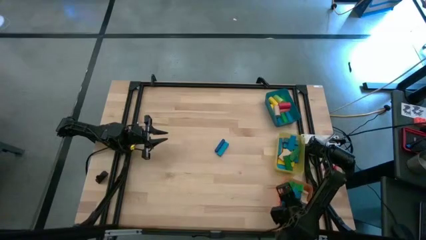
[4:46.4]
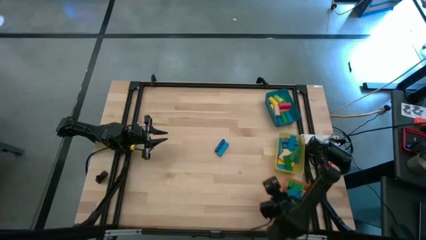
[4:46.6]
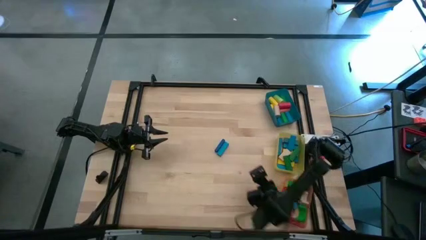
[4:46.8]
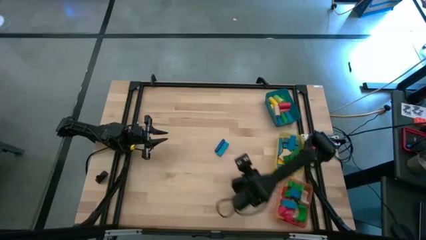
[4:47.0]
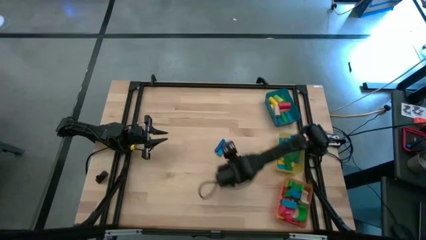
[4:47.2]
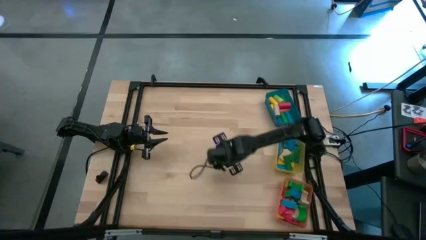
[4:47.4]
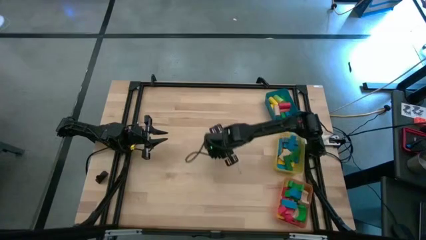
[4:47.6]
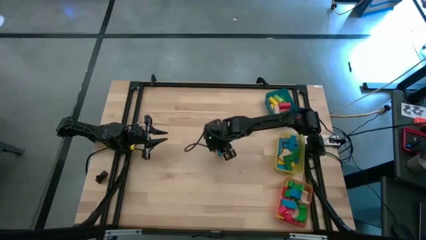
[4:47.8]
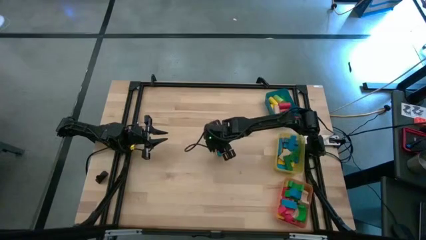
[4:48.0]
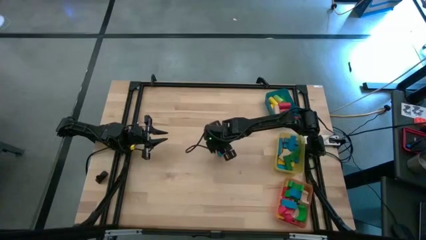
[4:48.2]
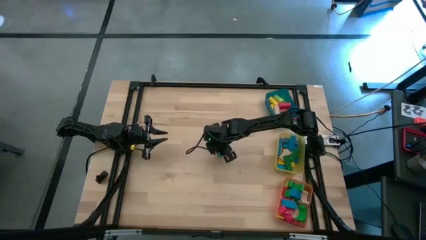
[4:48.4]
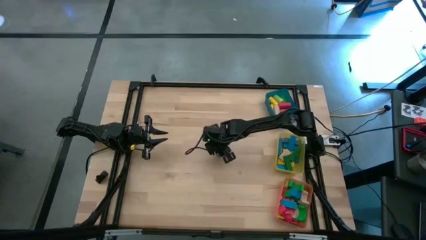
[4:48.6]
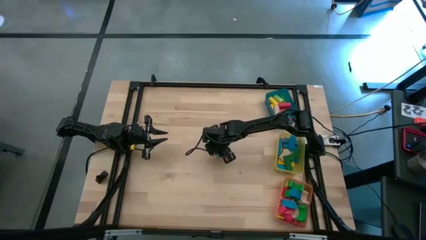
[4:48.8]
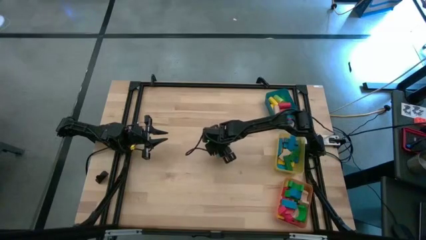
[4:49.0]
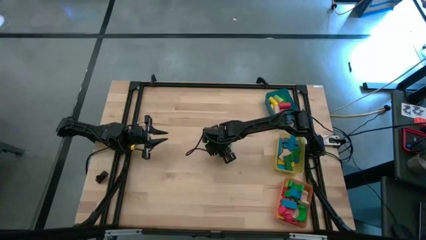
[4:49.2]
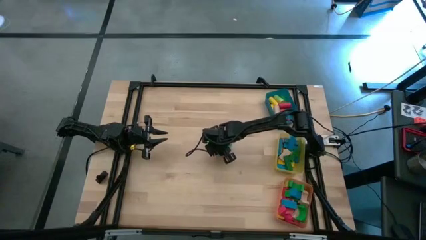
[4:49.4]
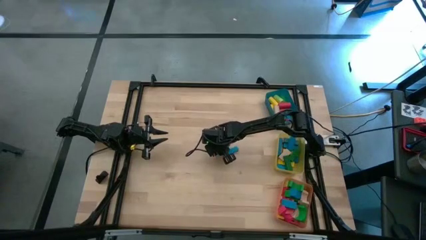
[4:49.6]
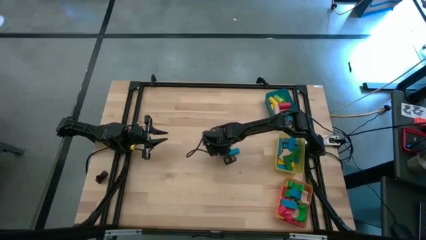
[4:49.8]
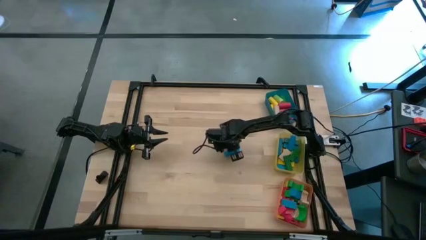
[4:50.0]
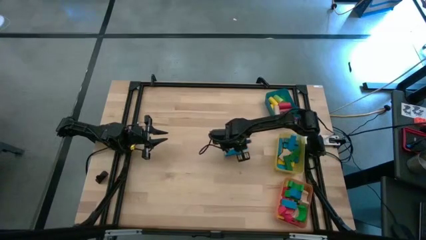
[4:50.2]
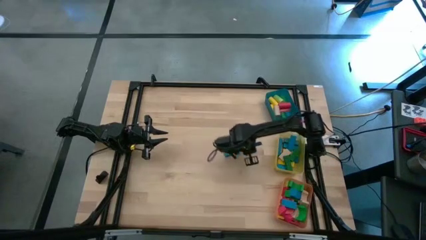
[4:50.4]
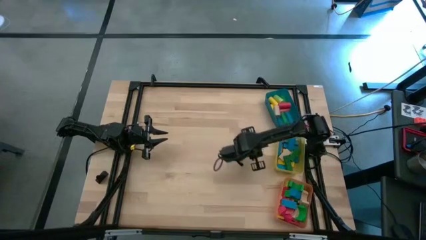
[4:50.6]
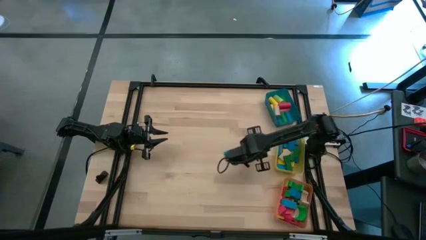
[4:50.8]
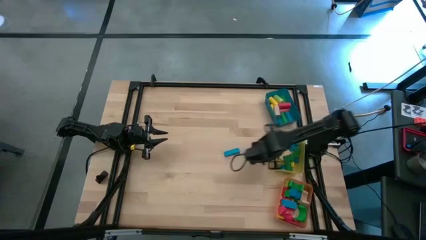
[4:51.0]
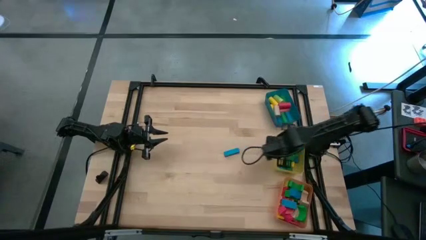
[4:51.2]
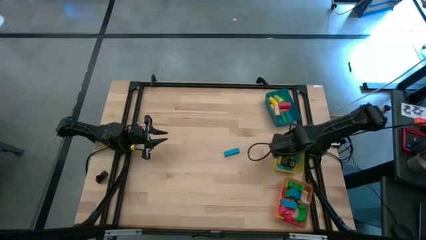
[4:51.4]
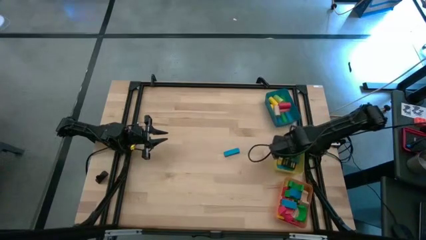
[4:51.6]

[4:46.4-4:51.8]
Task: Sort blocks by size
Put the blue rectangular block into the yellow bin

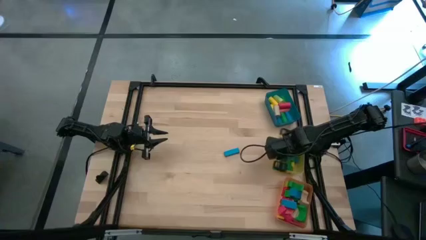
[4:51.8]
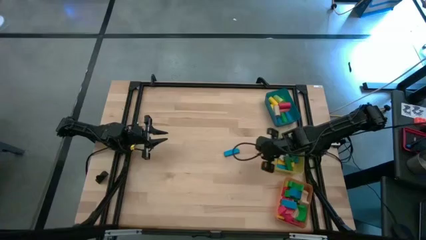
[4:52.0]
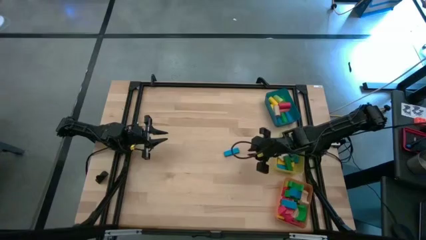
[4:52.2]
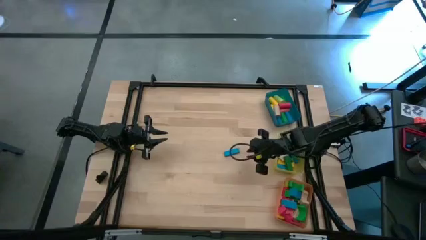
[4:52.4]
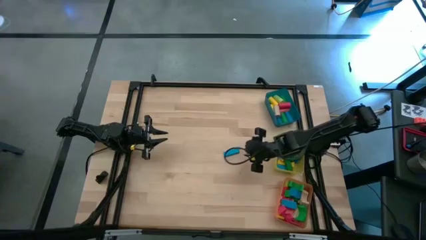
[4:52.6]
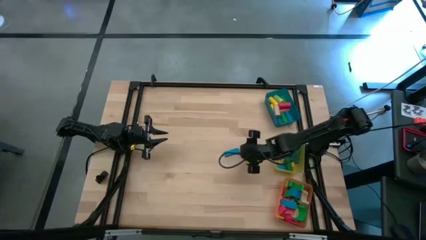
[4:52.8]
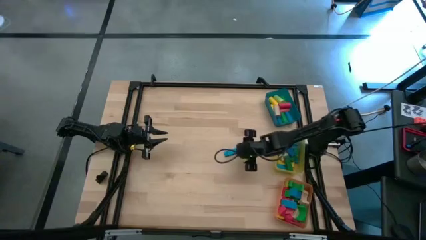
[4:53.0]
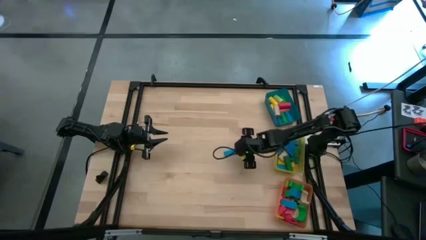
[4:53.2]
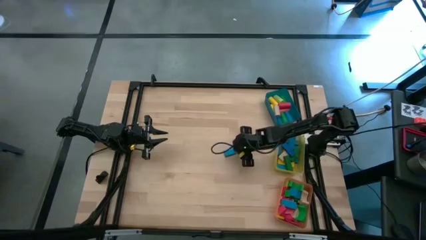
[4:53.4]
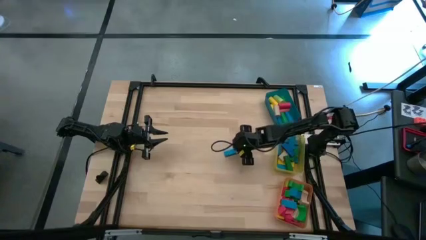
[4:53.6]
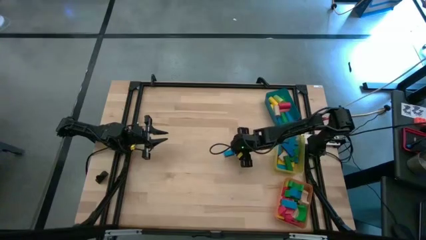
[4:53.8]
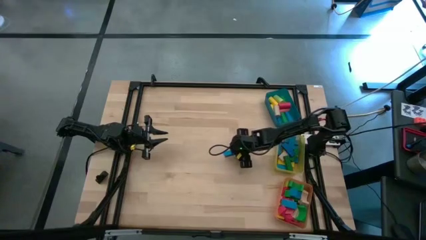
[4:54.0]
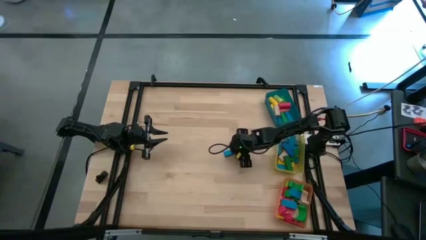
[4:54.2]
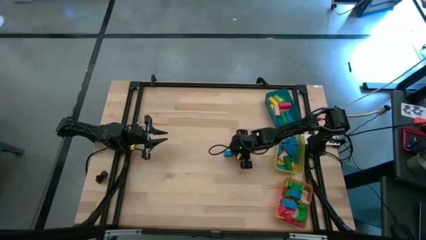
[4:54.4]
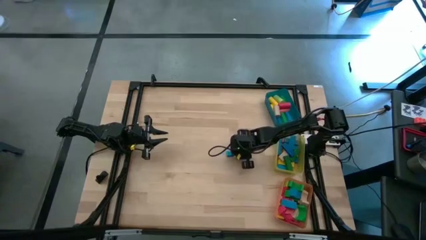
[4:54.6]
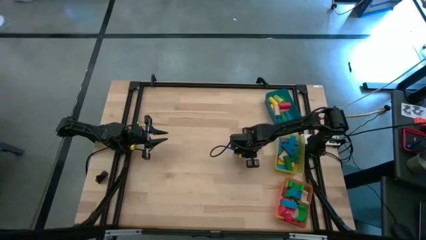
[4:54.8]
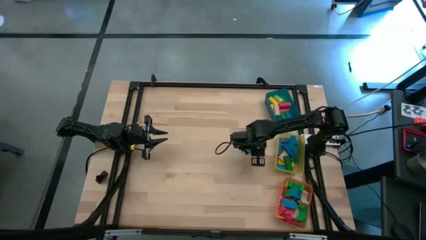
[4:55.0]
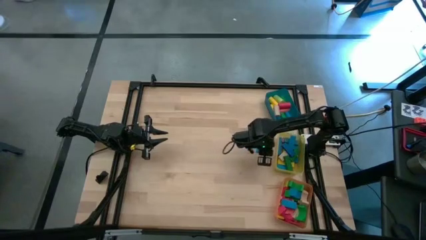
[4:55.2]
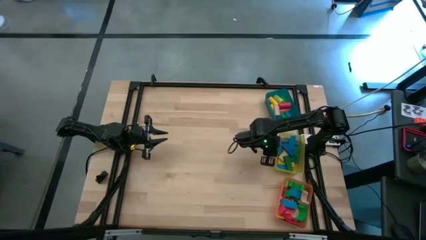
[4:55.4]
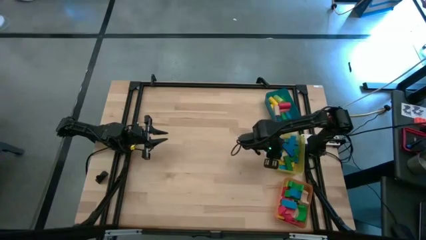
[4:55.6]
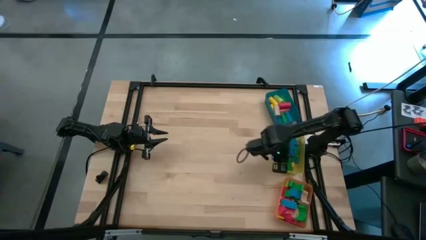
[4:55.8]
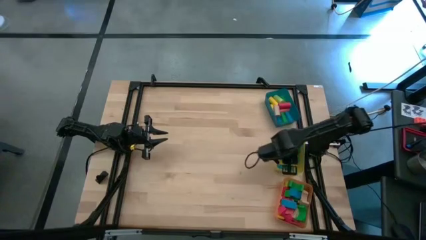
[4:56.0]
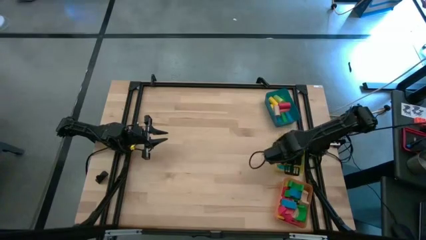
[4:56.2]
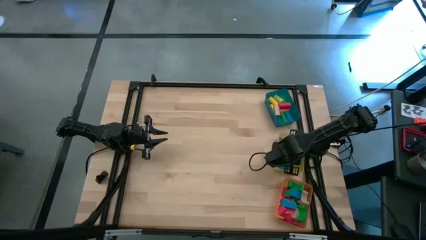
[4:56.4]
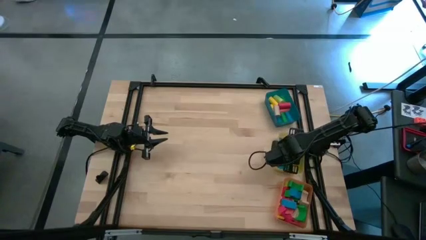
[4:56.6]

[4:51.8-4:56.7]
Put the blue rectangular block into the yellow bin

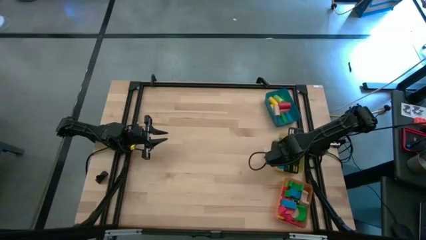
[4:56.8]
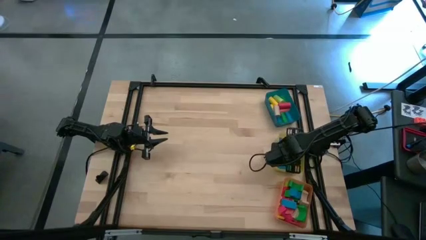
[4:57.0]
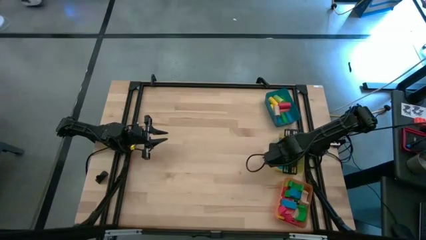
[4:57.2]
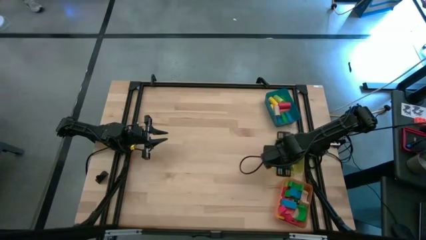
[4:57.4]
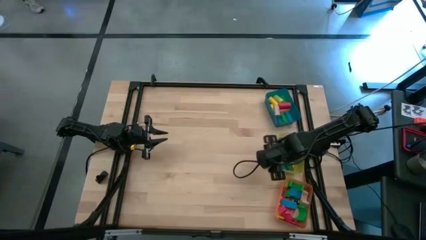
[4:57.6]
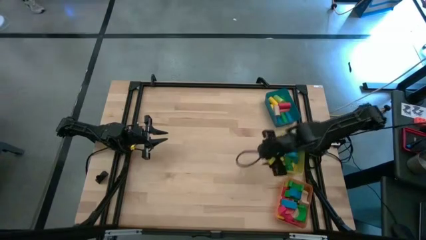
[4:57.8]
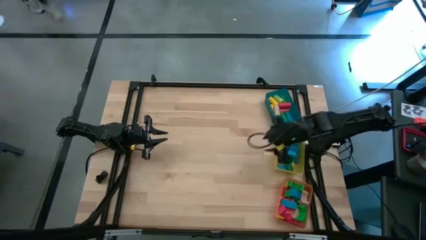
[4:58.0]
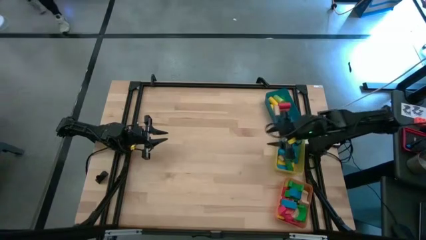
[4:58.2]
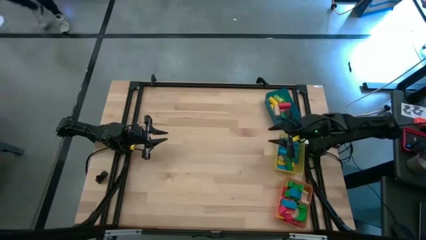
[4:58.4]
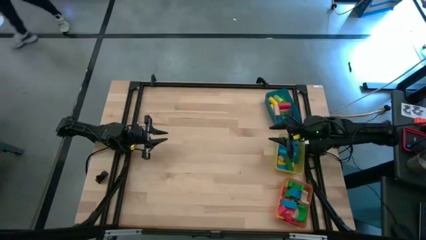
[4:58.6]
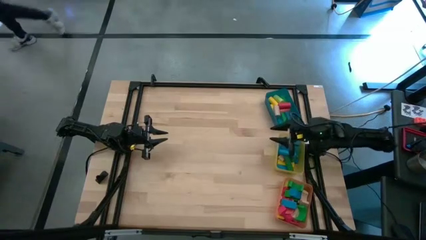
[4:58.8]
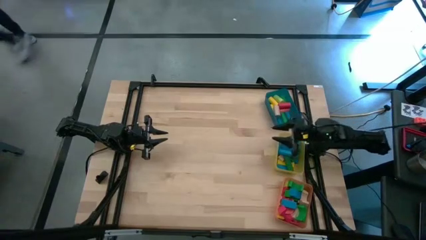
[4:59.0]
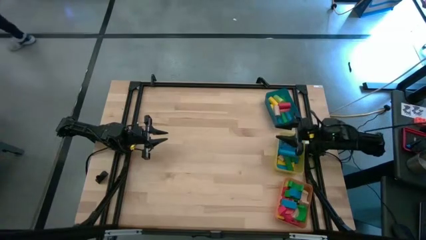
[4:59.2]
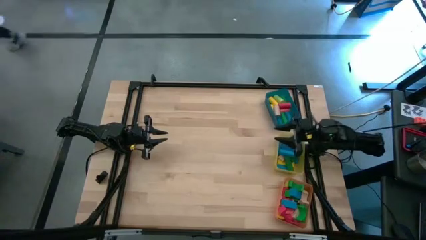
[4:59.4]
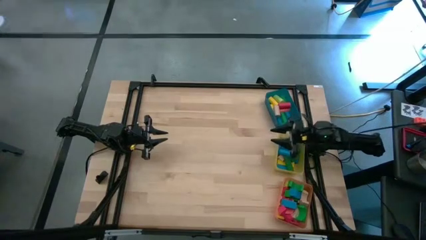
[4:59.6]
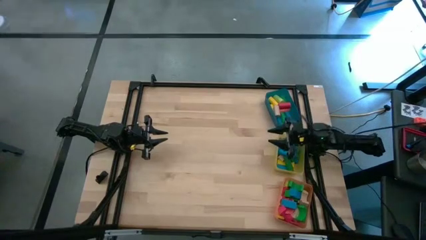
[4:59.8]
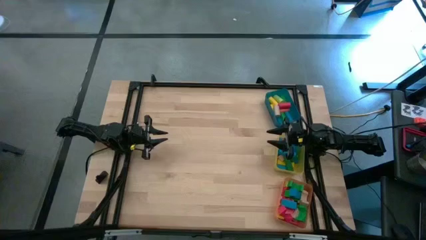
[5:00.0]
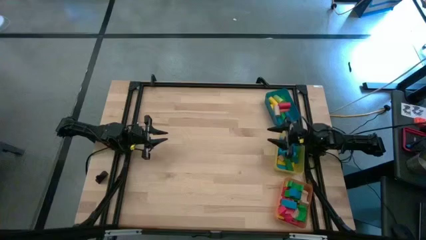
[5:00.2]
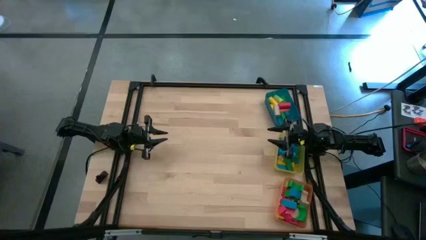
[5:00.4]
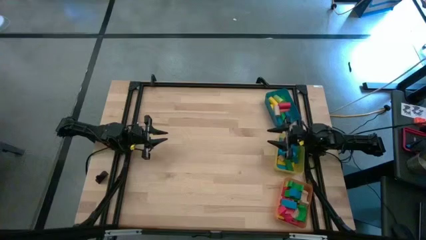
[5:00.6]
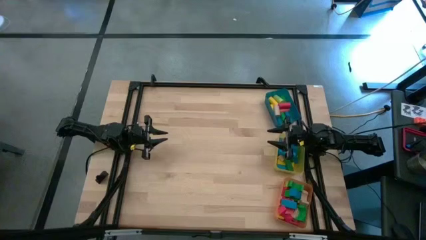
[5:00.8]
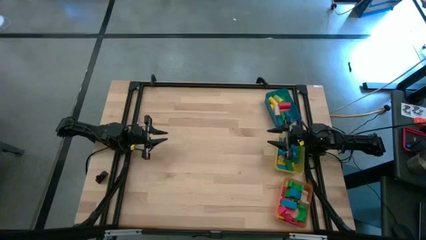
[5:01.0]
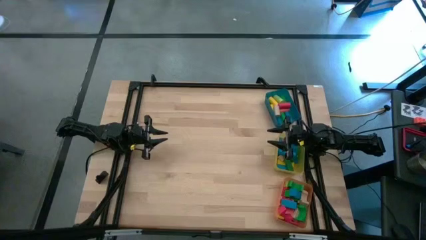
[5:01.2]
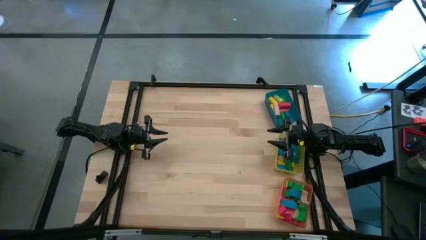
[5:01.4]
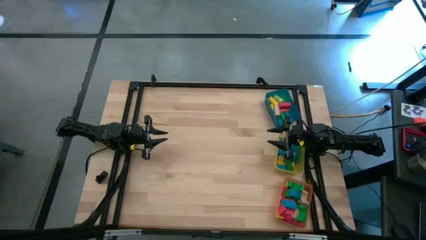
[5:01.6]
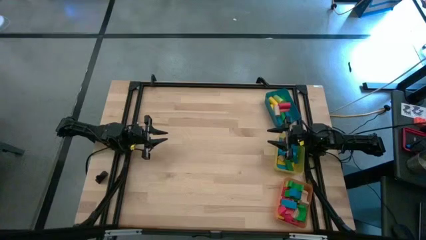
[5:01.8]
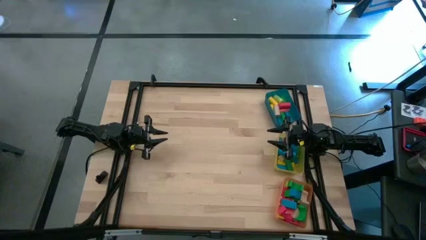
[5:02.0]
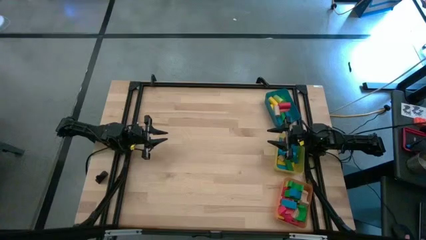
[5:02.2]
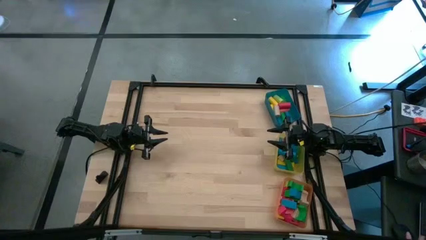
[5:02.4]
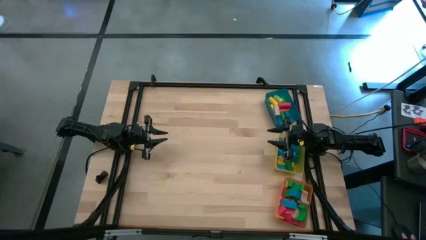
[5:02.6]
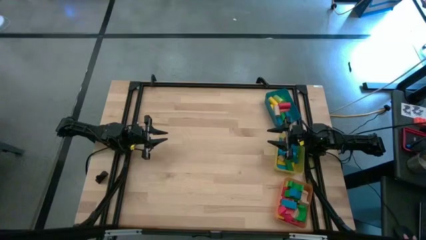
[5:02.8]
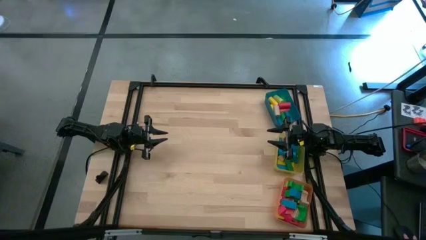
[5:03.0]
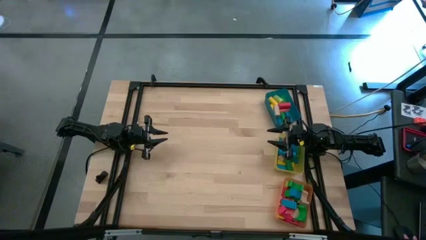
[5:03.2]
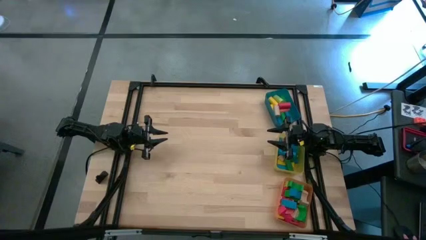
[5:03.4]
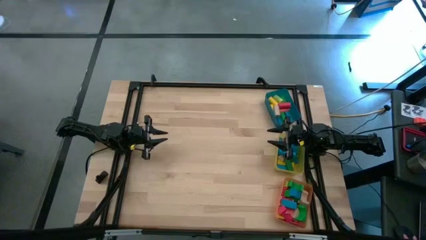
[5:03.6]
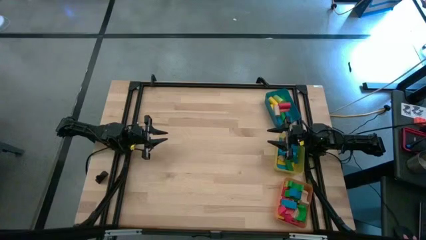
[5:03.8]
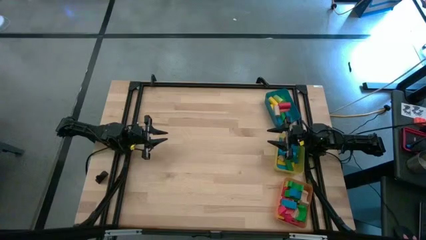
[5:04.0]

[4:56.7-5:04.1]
Return to Home Position
